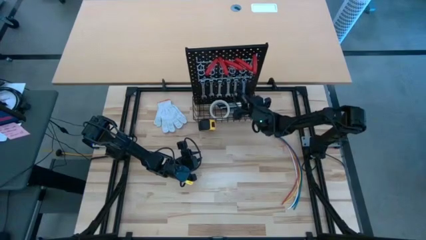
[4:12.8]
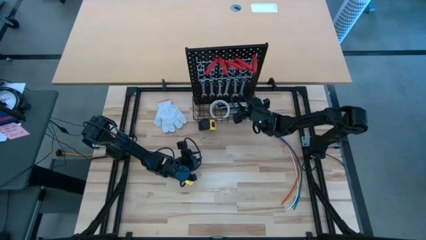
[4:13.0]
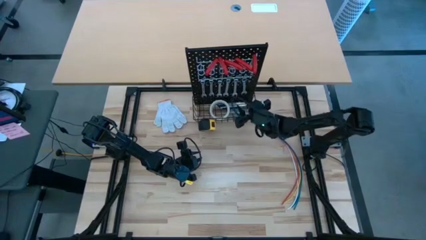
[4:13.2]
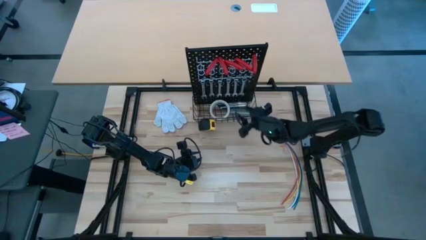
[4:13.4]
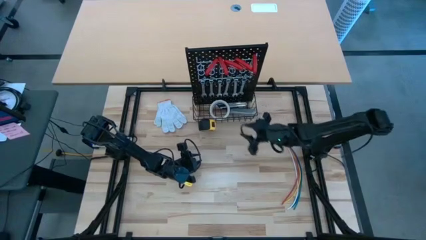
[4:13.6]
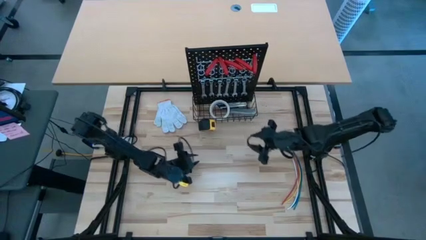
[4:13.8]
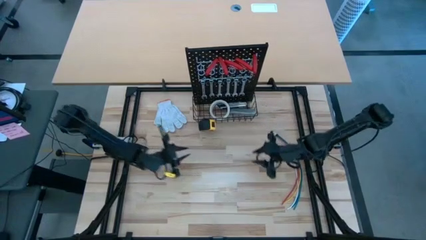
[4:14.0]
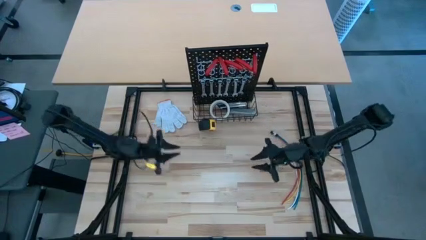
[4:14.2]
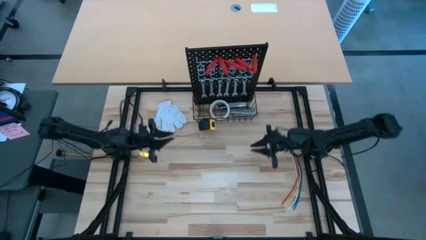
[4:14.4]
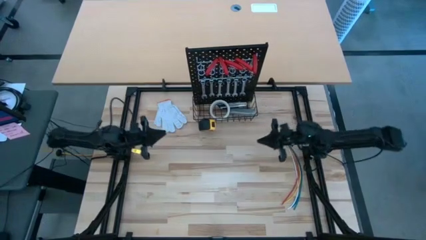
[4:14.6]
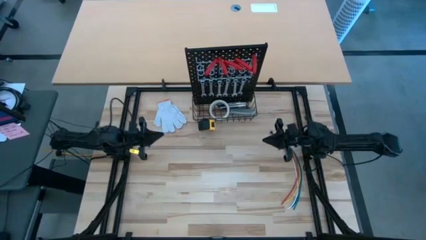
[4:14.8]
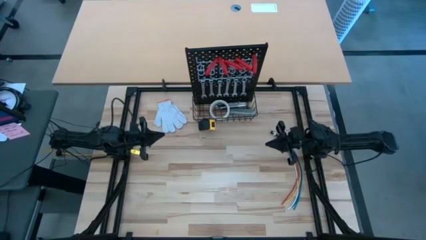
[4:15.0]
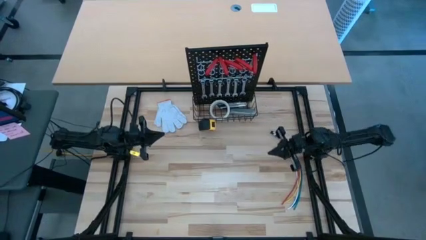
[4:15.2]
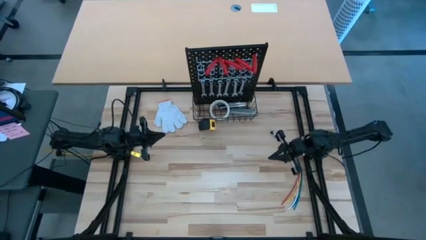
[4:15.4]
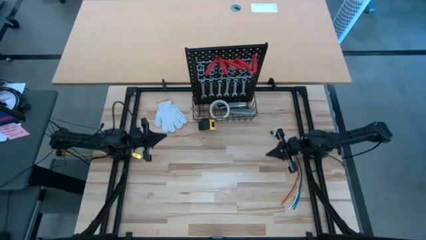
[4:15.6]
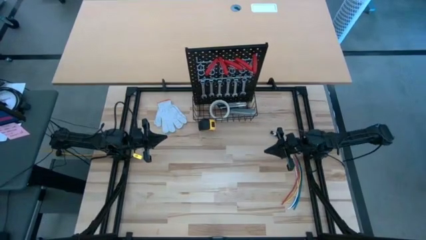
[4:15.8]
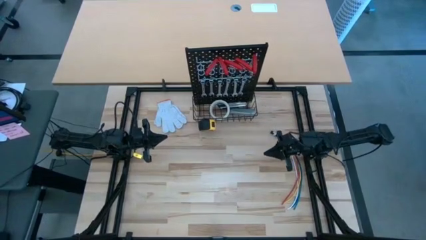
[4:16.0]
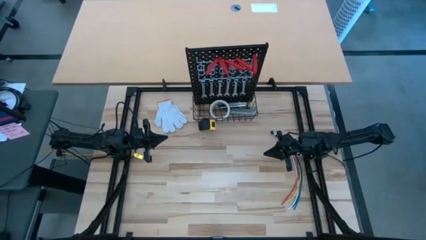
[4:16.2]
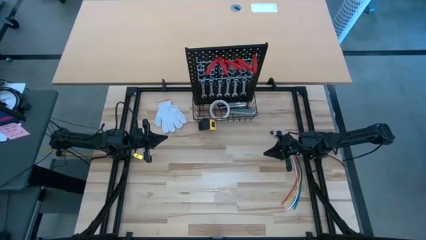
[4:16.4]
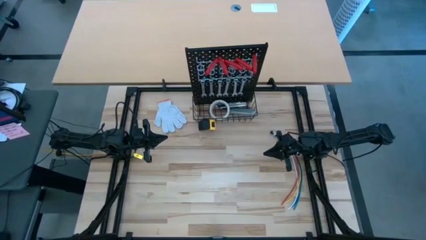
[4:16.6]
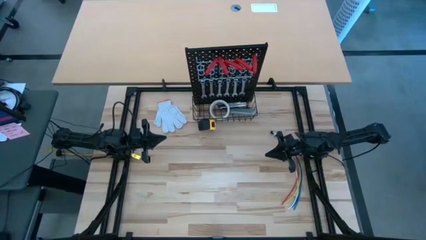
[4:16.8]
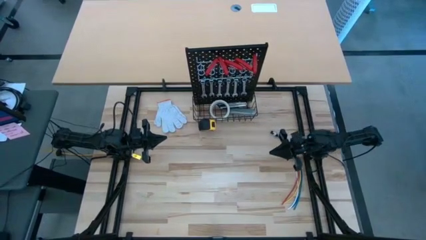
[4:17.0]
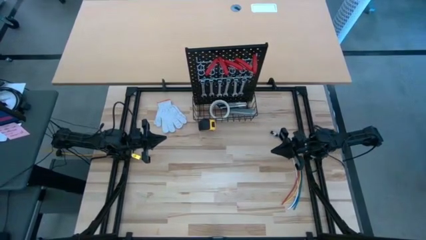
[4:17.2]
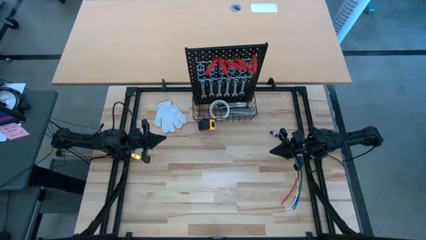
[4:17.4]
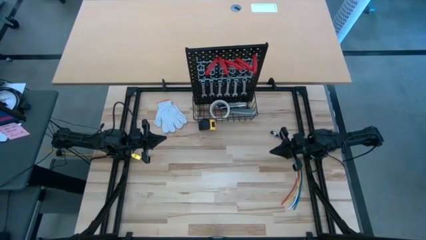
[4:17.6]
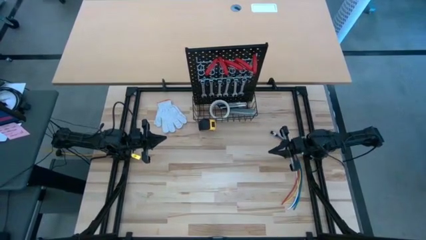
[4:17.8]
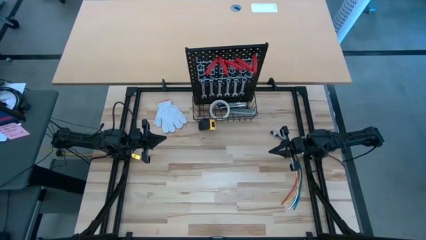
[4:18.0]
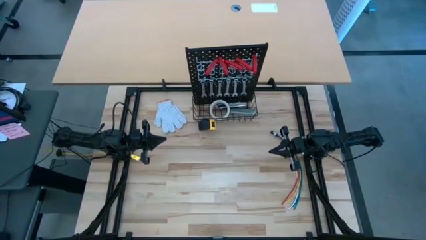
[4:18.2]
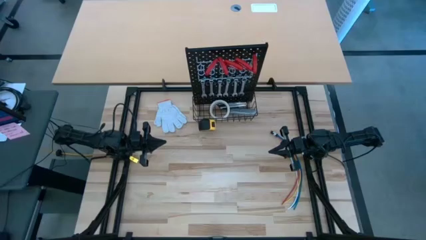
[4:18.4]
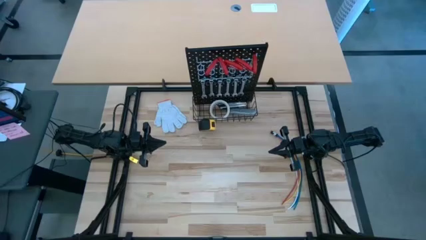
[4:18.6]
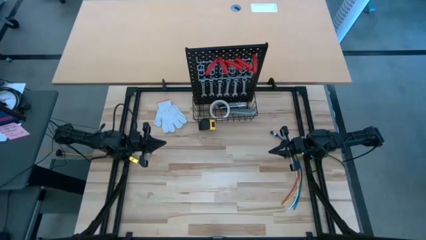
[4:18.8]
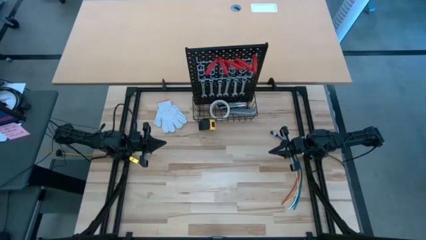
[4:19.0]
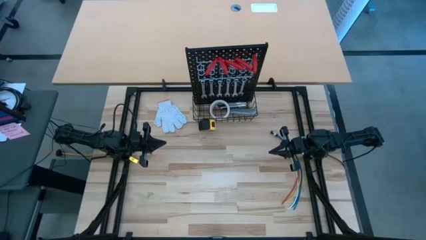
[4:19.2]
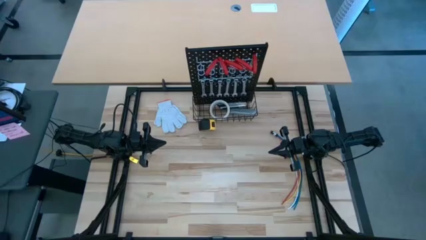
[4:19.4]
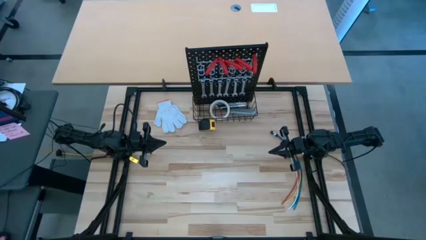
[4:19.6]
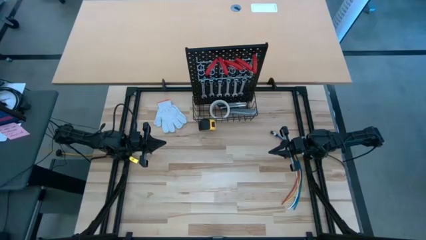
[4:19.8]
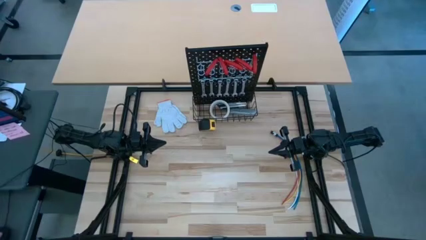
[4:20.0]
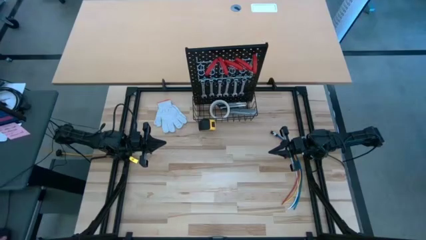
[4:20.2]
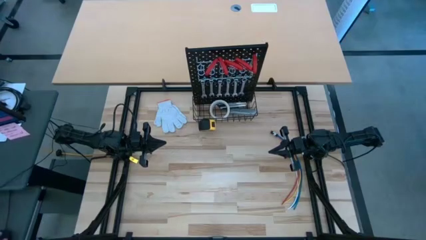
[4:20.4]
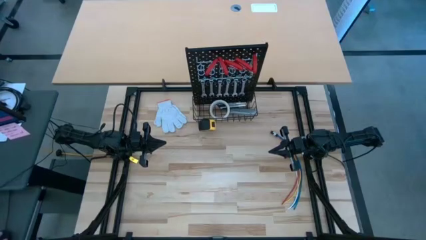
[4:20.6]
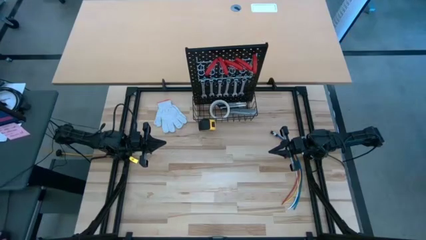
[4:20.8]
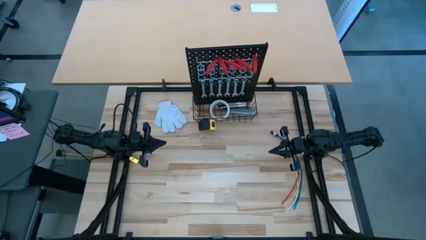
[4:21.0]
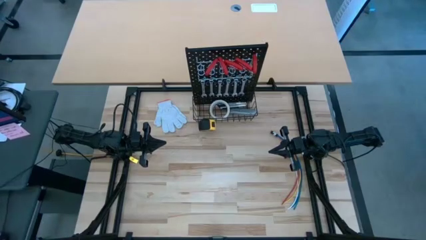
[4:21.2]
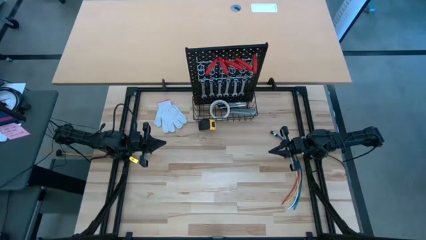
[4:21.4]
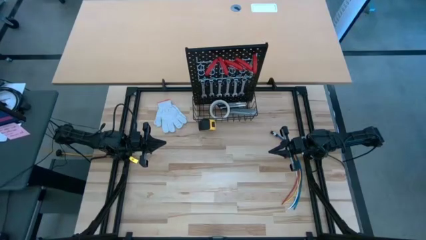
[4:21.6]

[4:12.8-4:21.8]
Task: Hang tools onto peg board
Return to Home Position

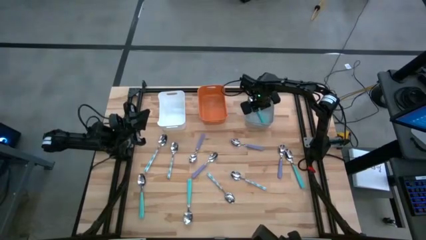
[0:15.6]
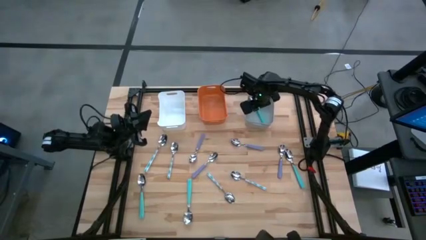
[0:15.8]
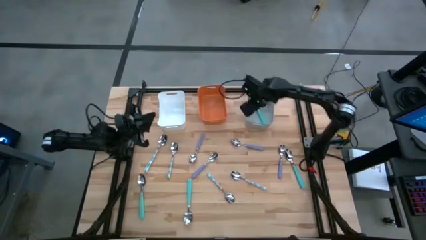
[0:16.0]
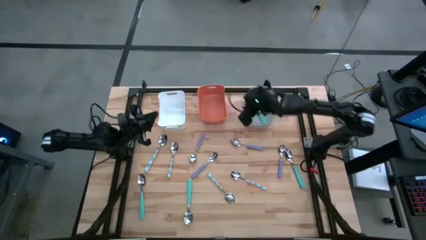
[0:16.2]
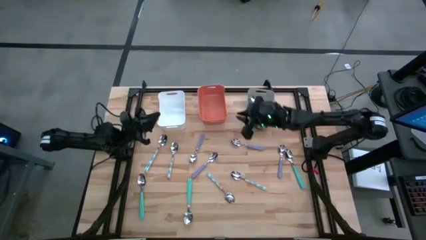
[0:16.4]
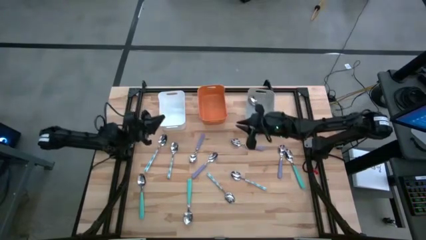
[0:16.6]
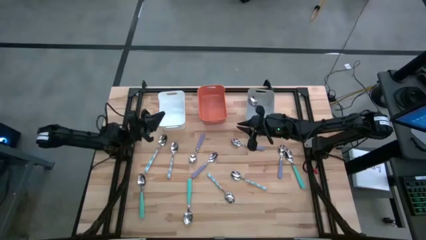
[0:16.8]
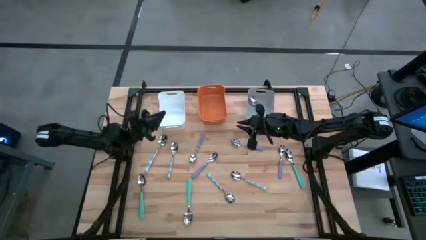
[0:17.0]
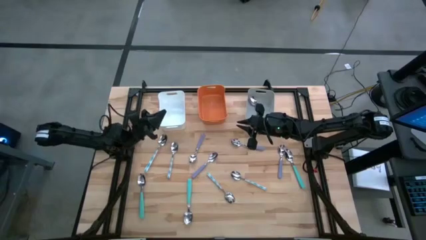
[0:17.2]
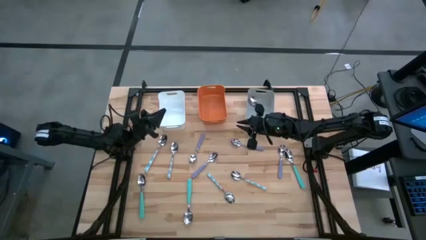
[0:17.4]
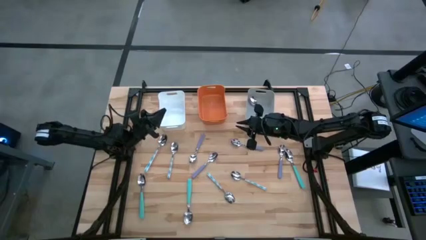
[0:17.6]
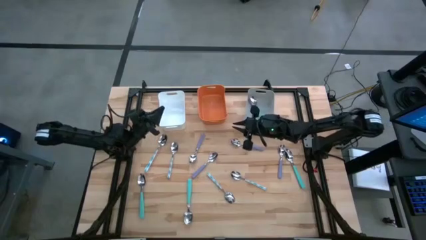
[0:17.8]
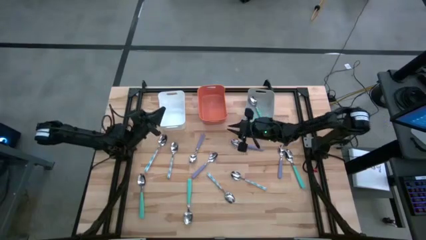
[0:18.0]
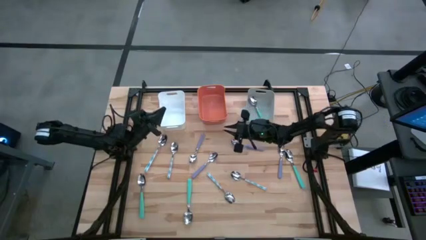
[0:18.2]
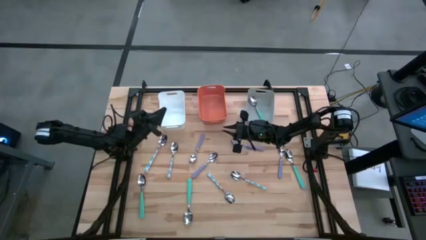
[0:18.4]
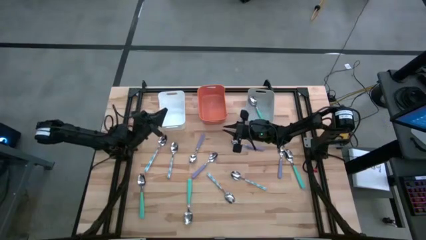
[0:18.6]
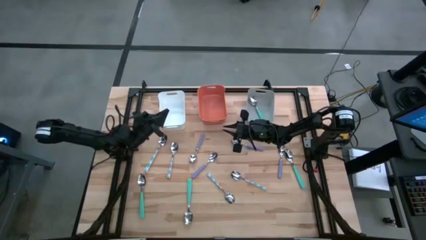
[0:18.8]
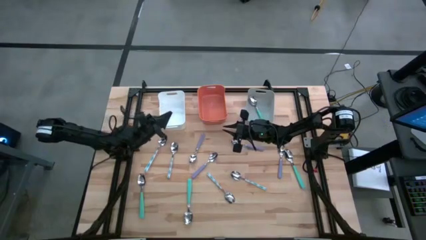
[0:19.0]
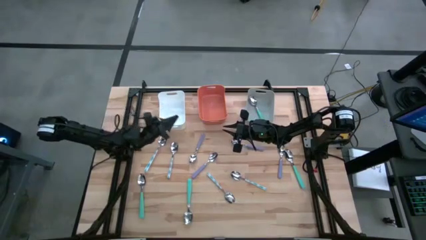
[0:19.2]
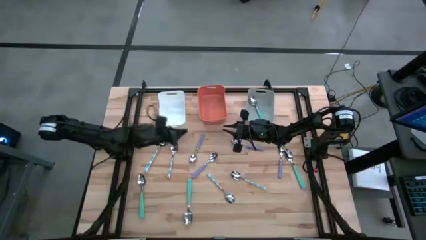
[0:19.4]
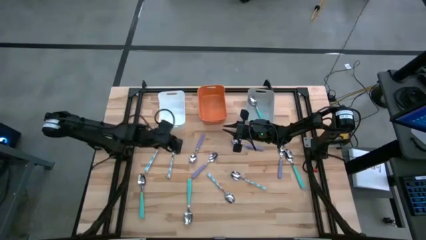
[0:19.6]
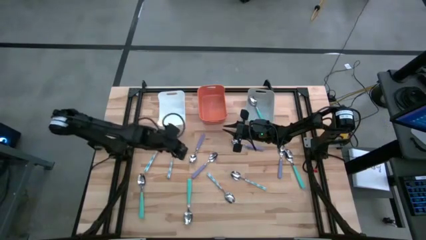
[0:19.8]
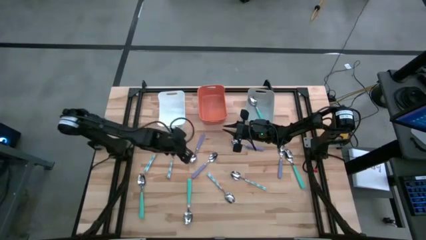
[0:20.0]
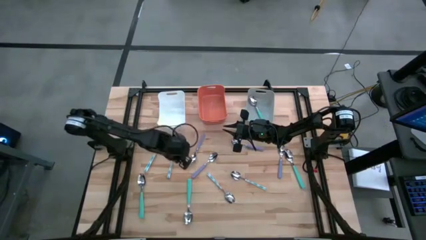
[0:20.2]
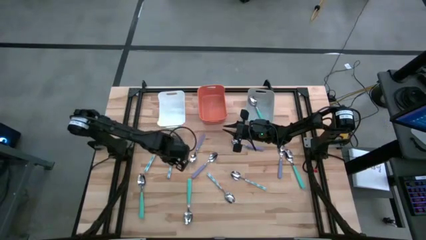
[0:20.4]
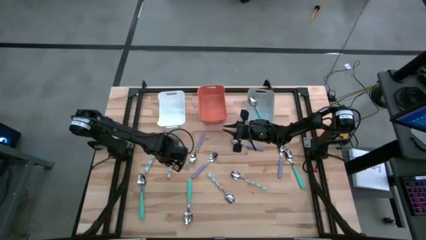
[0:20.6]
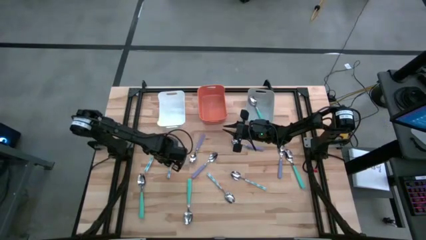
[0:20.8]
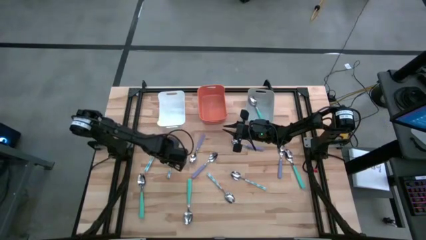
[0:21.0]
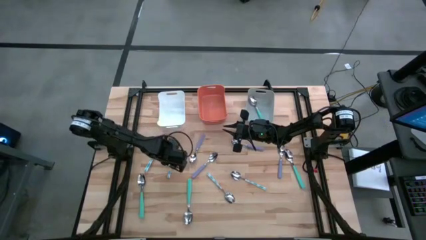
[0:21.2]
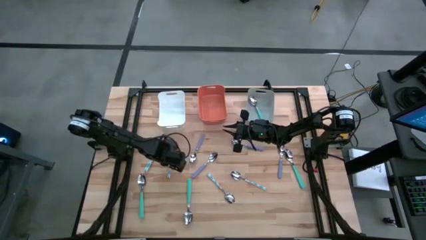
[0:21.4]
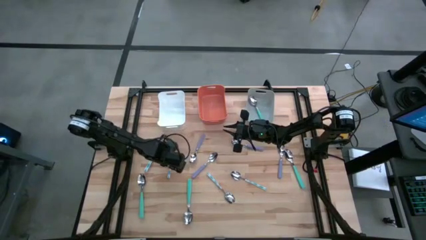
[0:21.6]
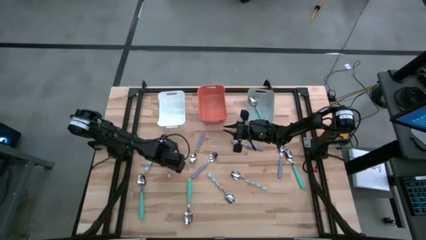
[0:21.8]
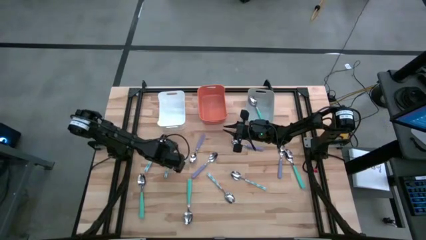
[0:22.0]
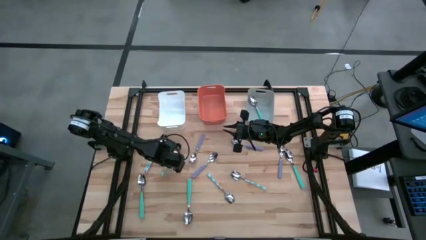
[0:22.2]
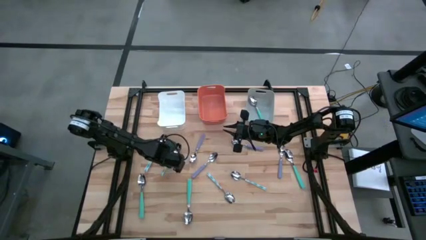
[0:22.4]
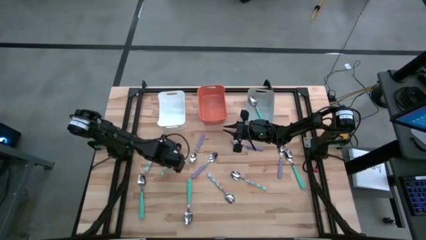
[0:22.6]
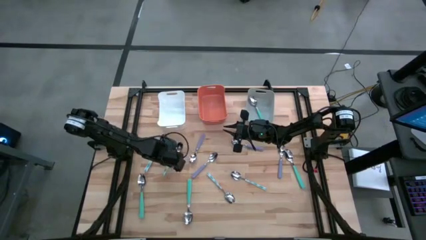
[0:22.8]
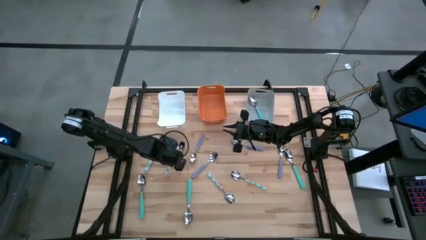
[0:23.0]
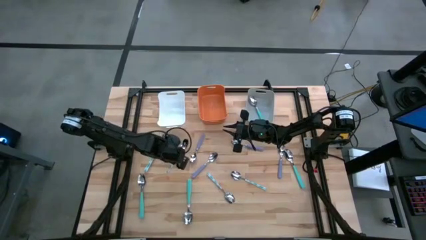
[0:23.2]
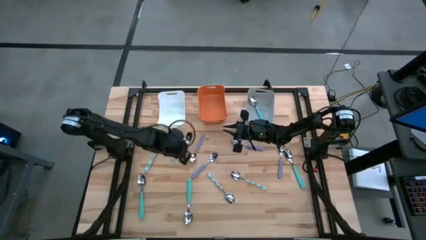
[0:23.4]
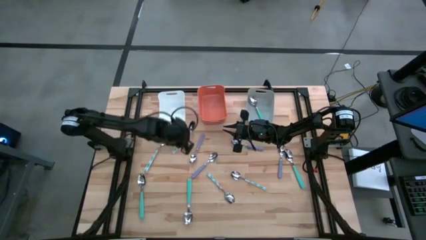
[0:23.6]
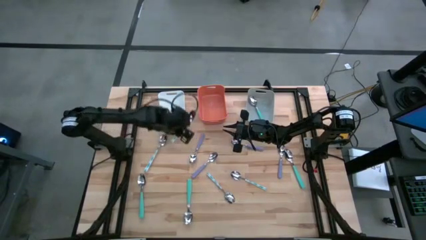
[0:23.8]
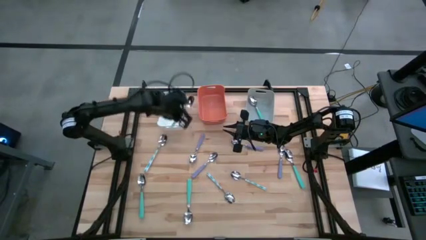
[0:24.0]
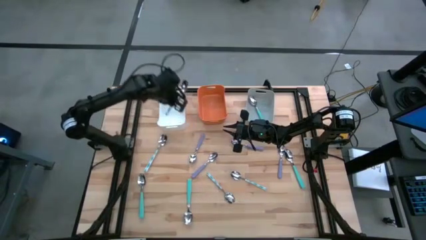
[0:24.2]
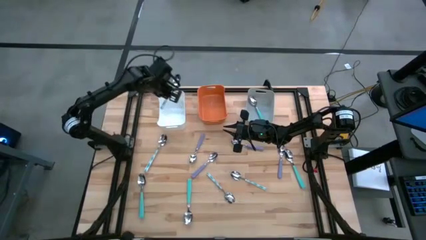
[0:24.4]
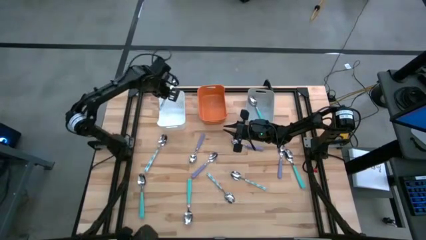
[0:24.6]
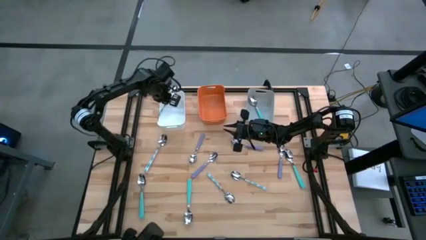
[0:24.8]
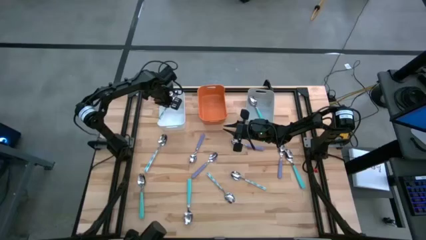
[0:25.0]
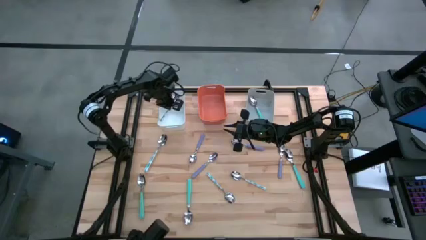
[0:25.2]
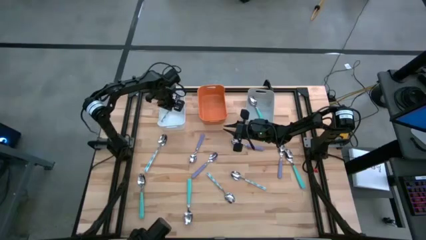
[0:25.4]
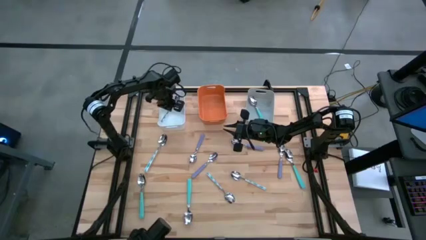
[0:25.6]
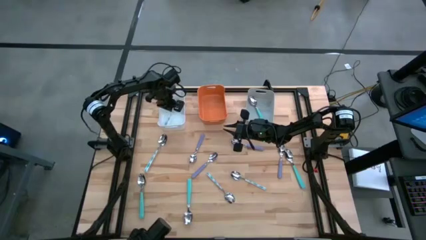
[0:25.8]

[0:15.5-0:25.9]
Task: Sort silverware by color (type)
Put the blue patterned spoon into the white bin
